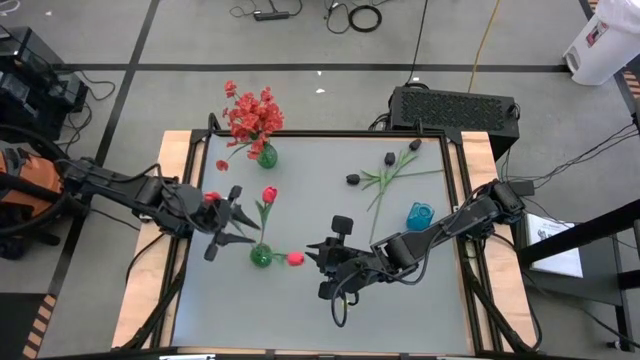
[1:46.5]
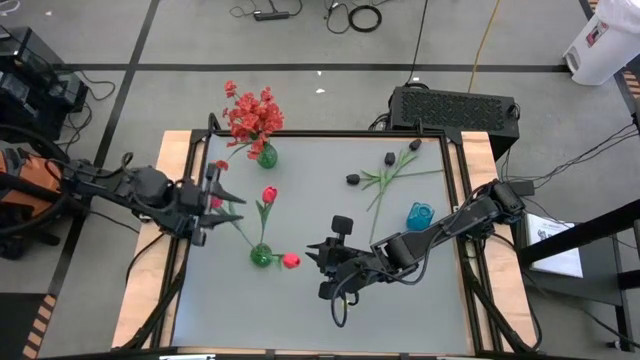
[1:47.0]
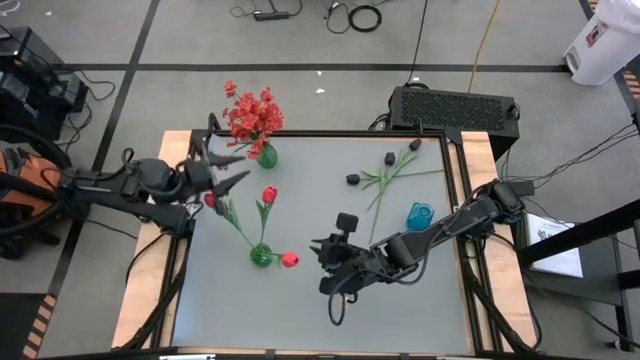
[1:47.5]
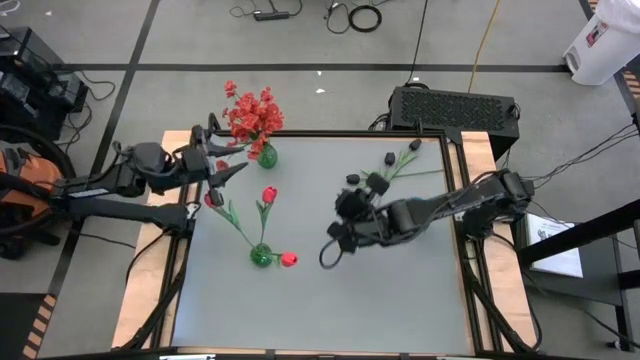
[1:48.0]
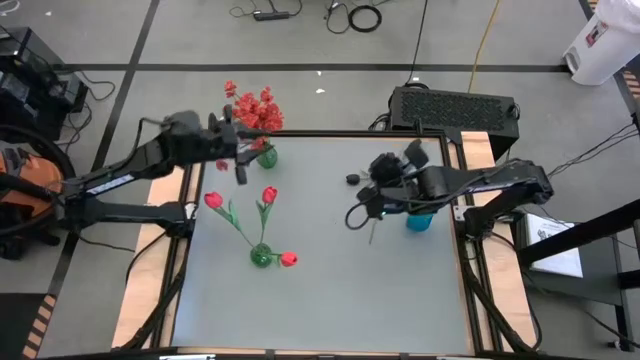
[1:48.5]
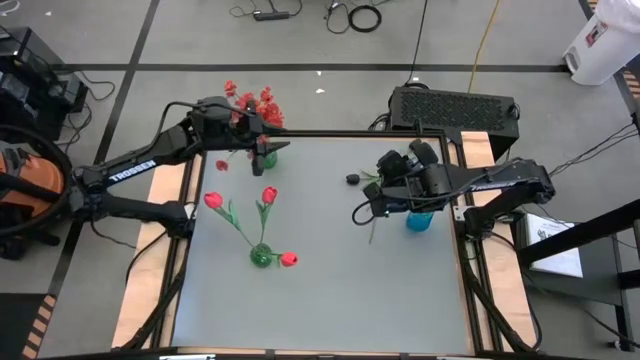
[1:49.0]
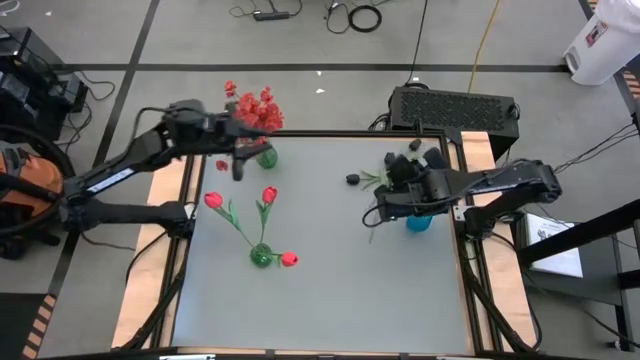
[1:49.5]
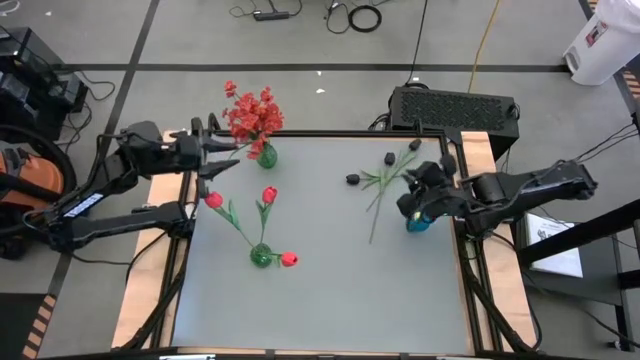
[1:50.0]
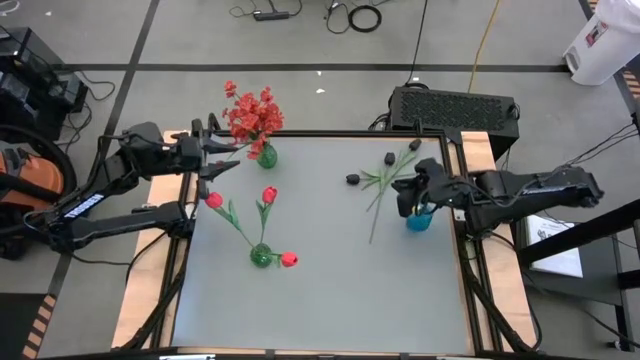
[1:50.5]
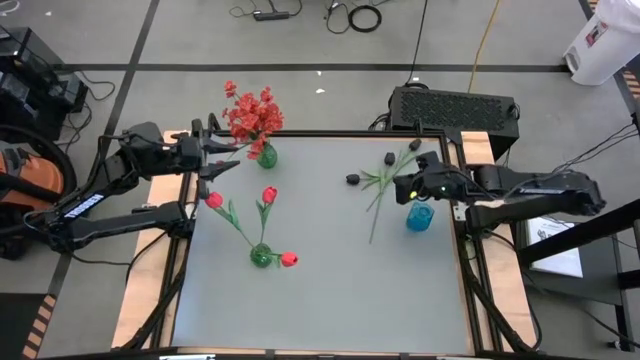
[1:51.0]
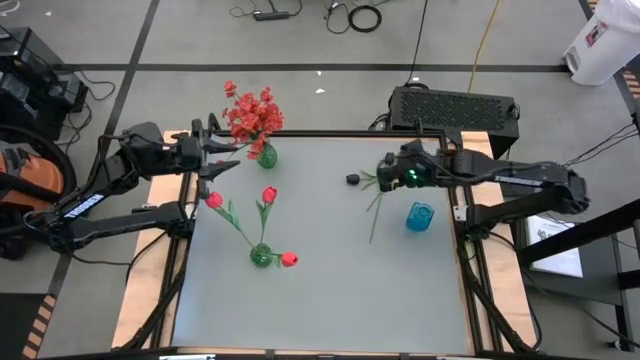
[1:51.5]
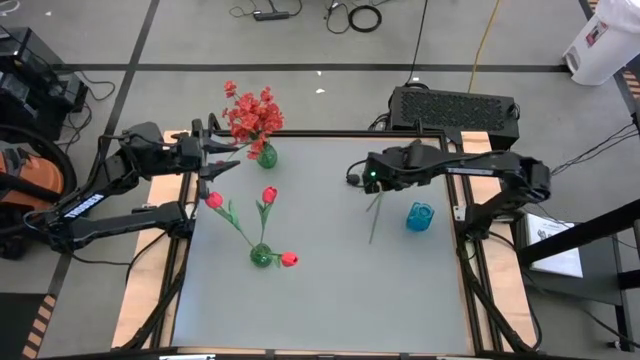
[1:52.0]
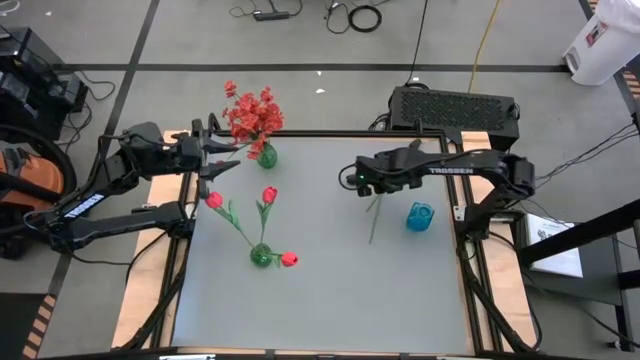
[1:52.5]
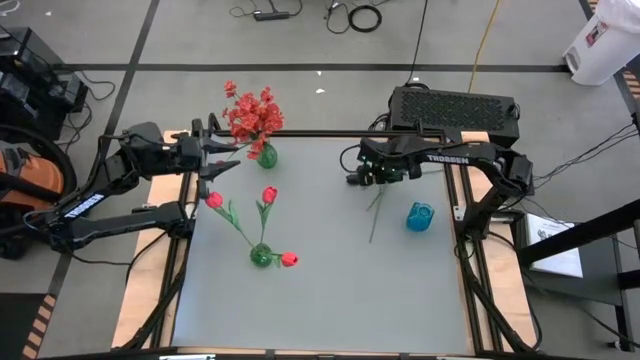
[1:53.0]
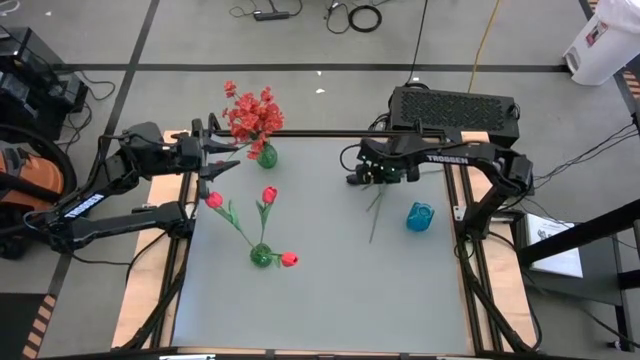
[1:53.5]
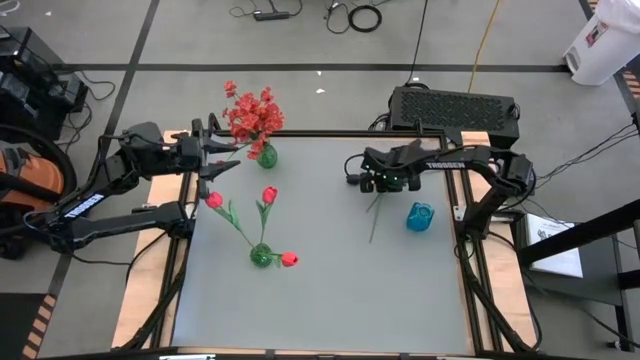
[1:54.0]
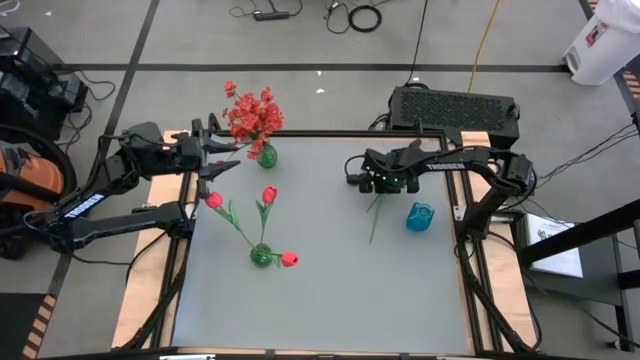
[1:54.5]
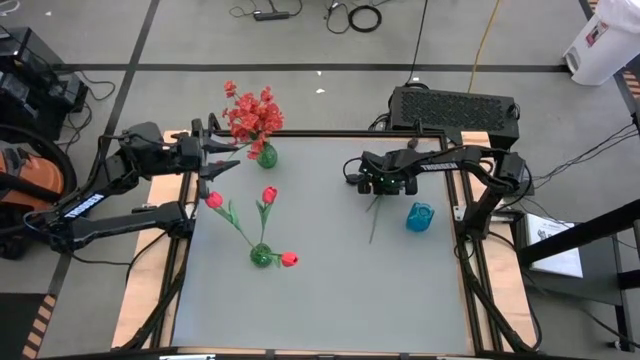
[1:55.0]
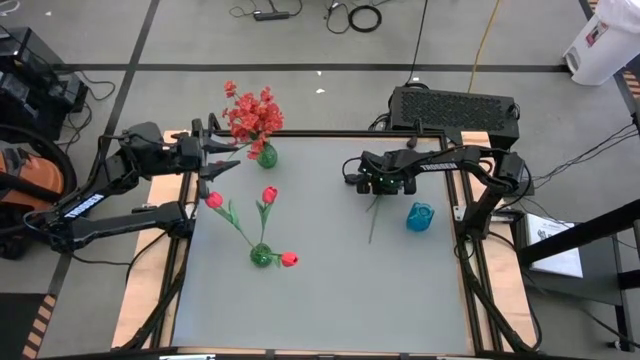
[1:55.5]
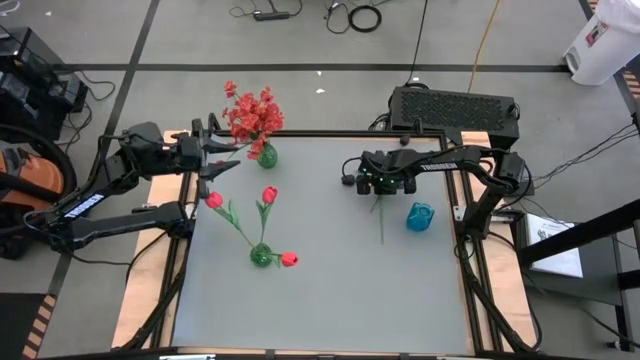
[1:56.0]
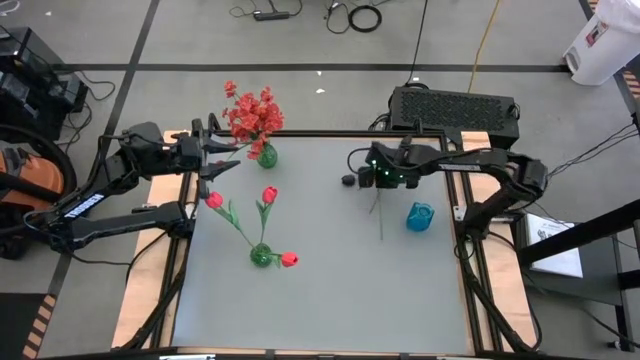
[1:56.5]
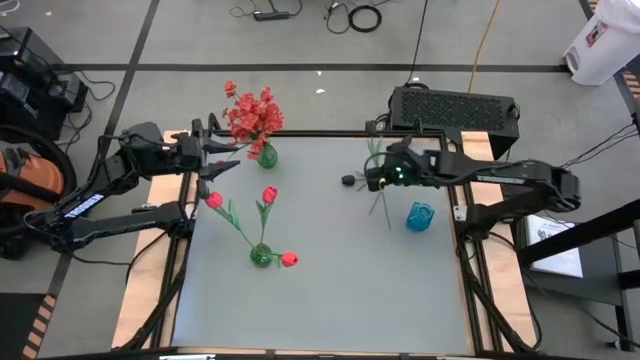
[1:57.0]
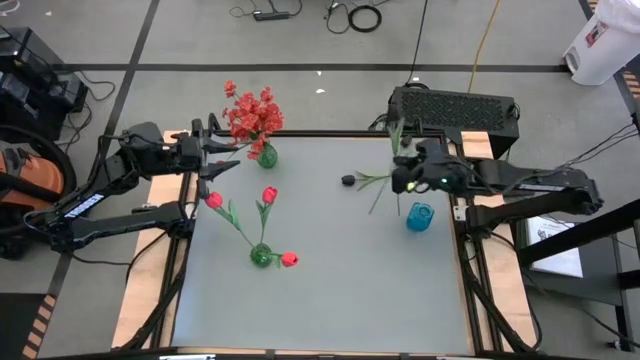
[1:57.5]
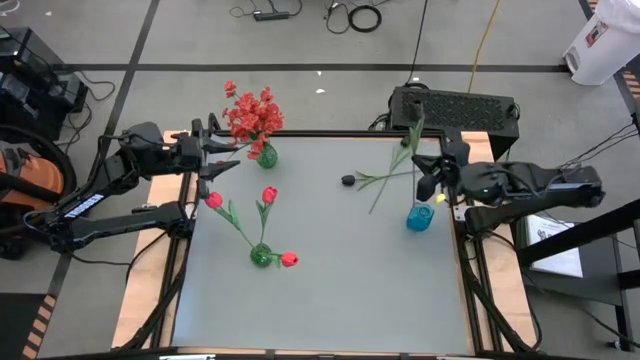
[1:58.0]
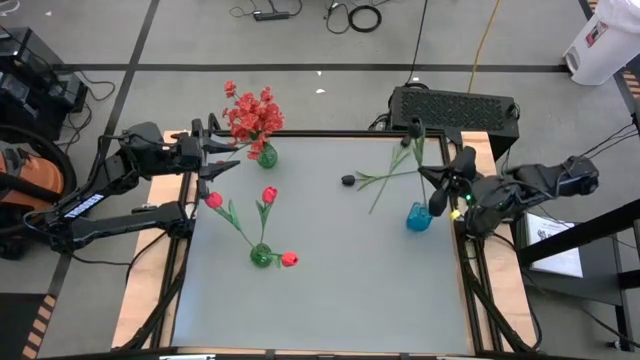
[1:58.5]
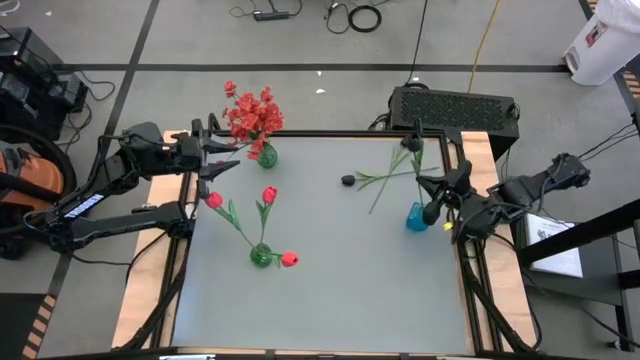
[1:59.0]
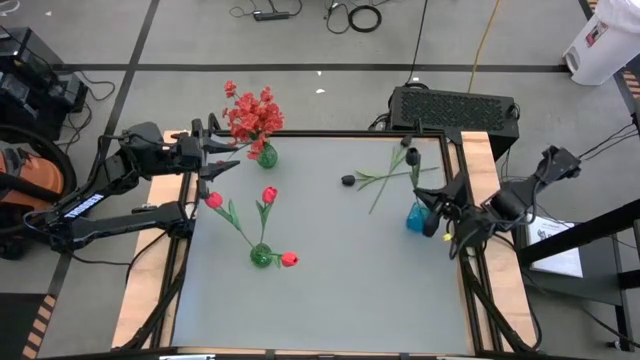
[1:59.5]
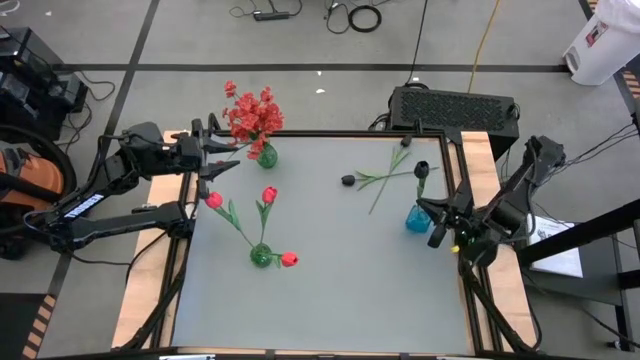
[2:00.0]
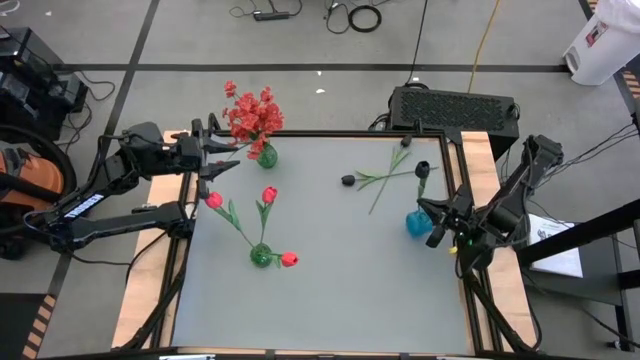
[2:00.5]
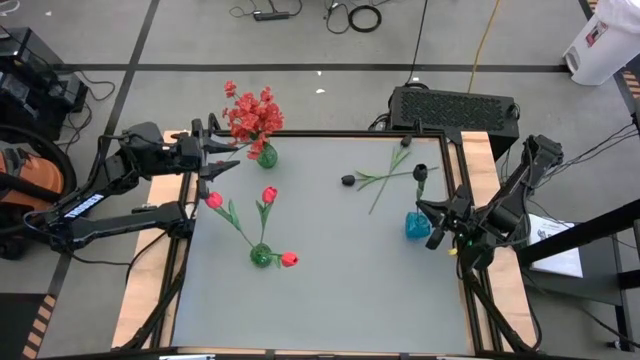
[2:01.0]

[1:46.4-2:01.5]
Task: Sort flowers into vase by color
Put the middle black flower into the blue vase

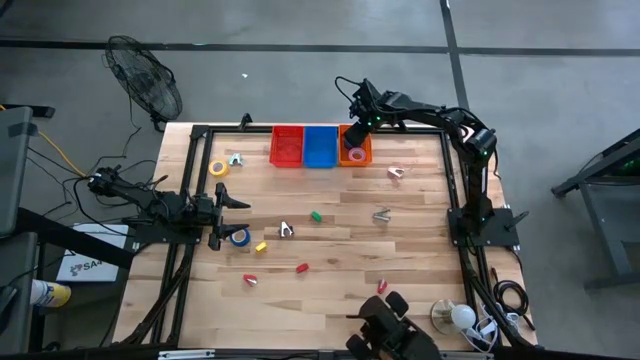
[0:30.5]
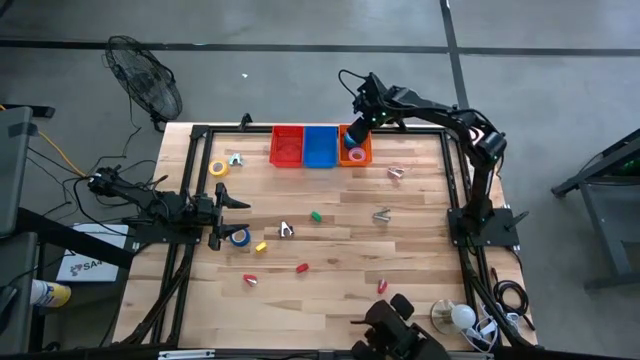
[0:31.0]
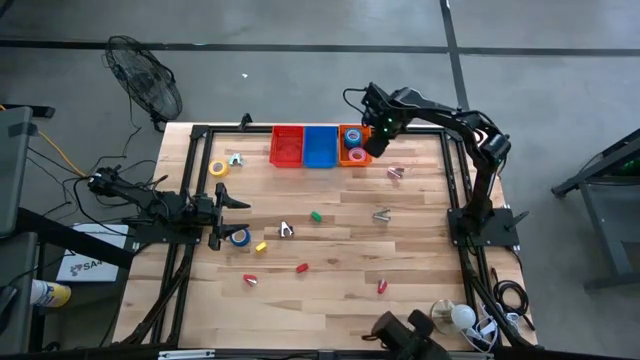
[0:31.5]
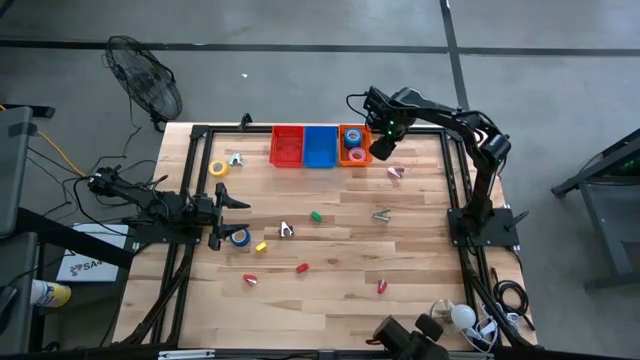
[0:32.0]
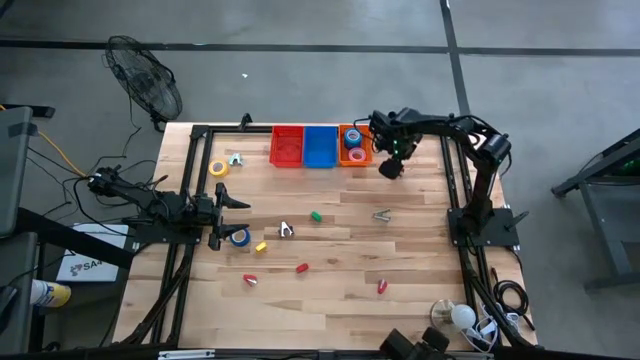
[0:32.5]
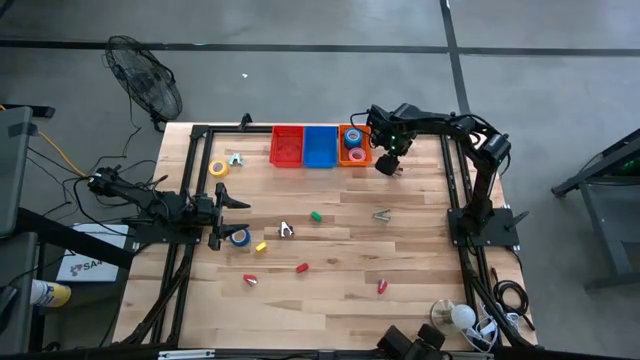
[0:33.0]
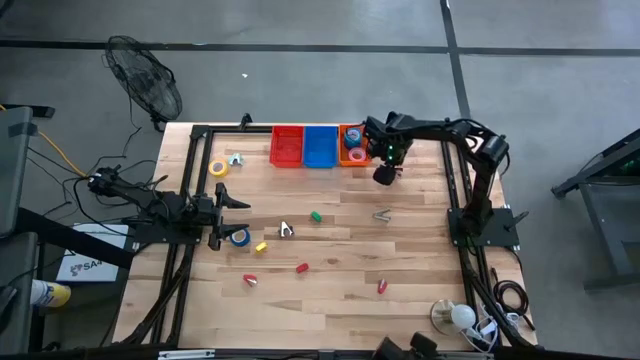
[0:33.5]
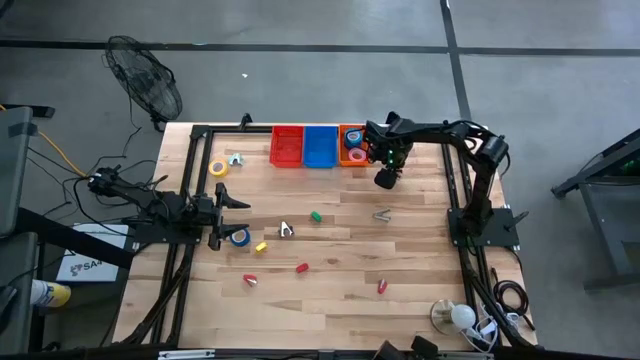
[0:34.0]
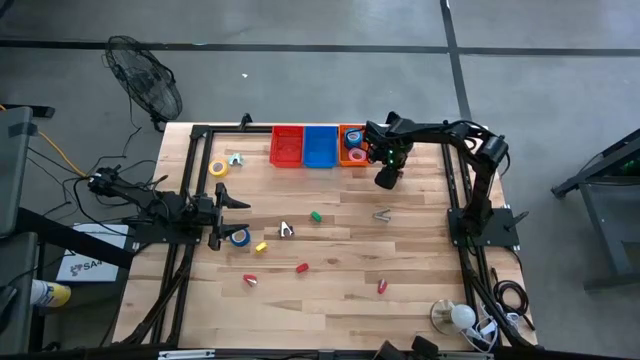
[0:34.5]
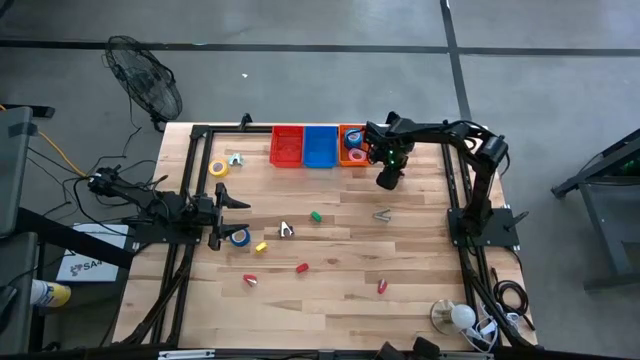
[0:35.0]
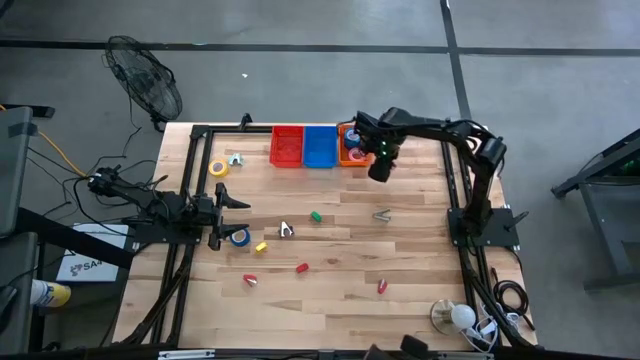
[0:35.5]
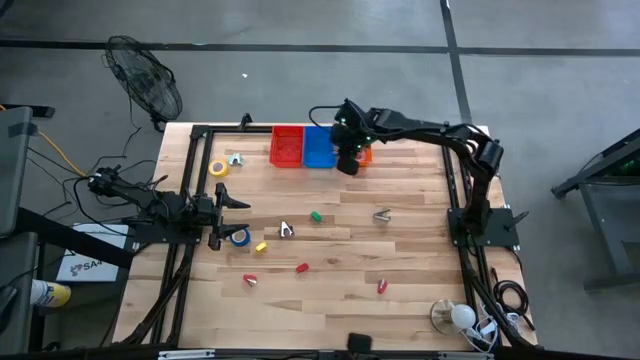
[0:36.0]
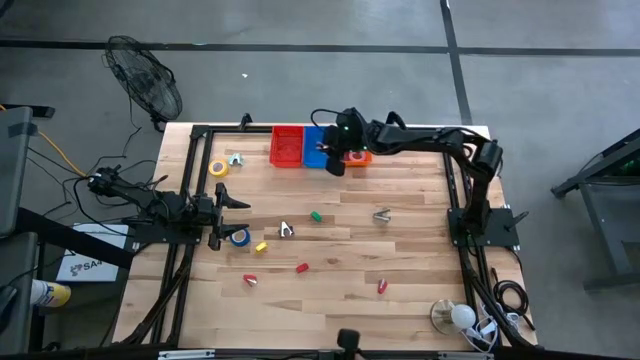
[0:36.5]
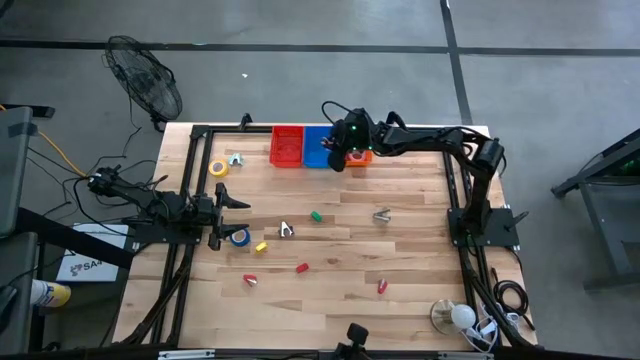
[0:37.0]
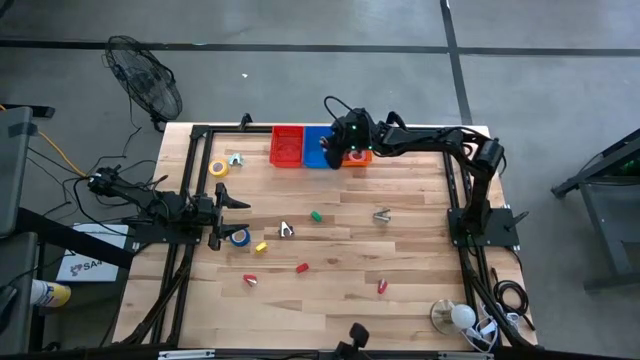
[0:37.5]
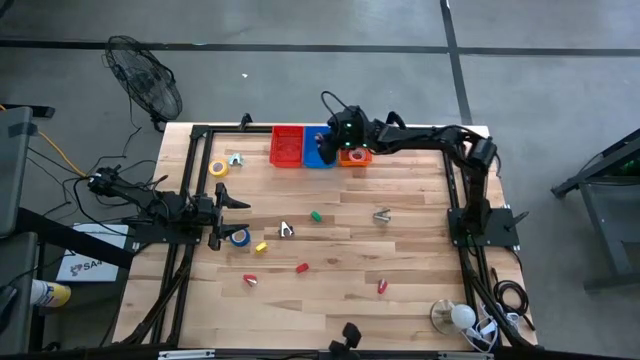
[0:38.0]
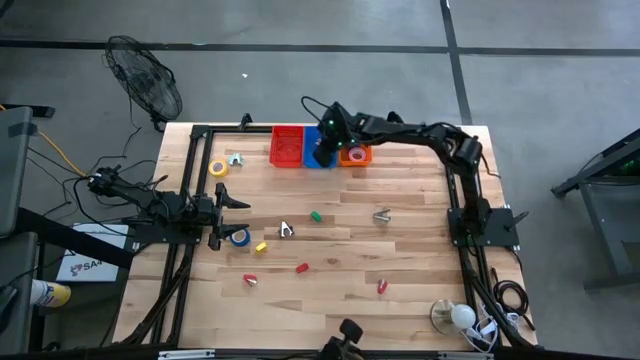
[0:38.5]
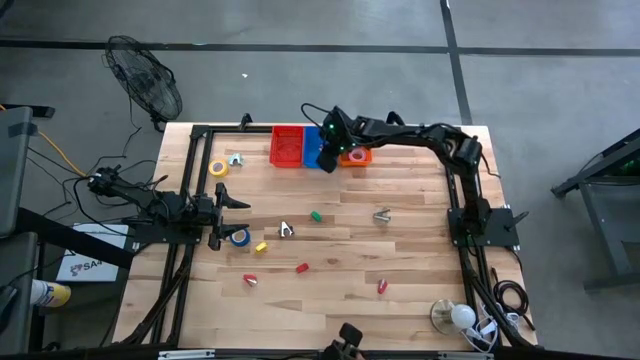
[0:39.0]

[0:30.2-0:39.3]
Task: Pick and place Stapler, Stapler remover, tape
Put the pink staple remover into the blue bin
